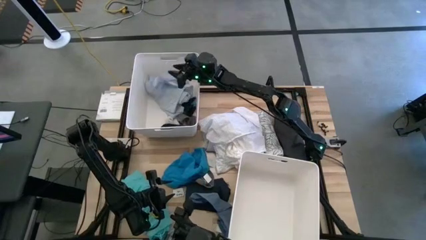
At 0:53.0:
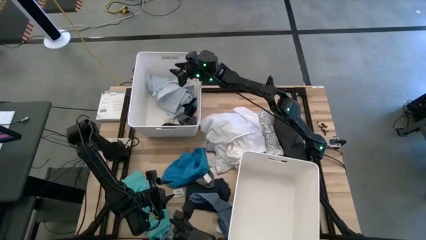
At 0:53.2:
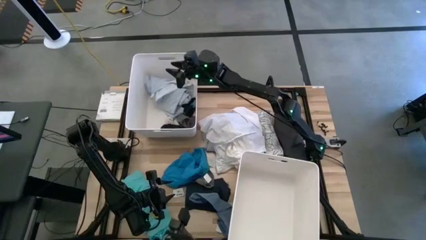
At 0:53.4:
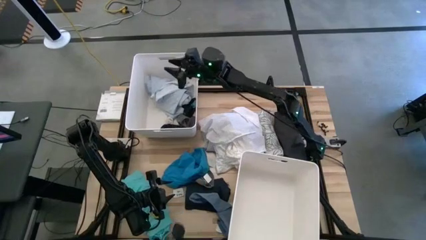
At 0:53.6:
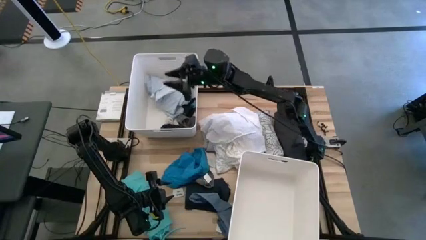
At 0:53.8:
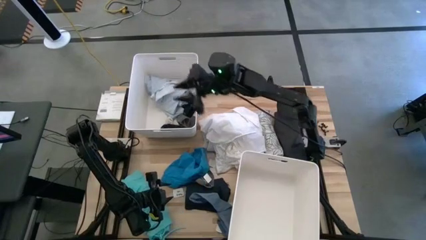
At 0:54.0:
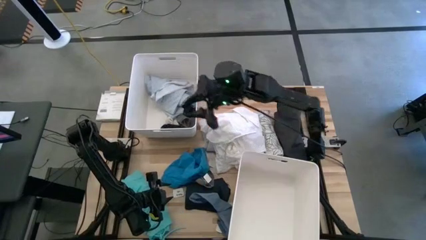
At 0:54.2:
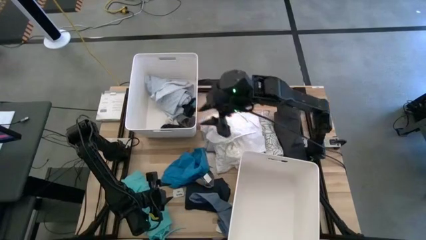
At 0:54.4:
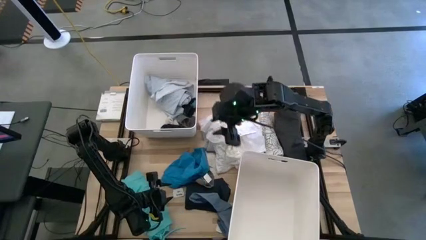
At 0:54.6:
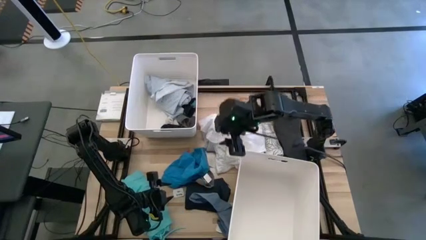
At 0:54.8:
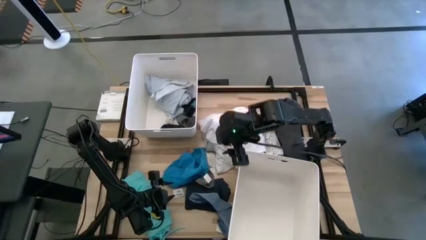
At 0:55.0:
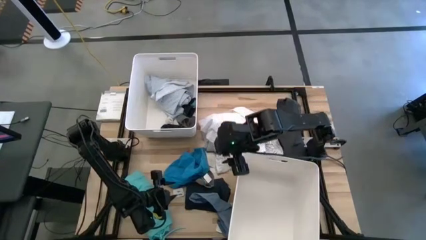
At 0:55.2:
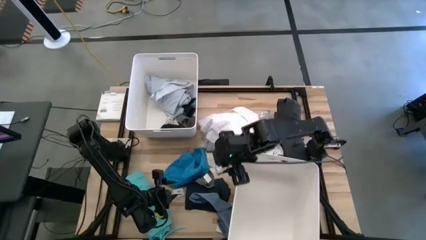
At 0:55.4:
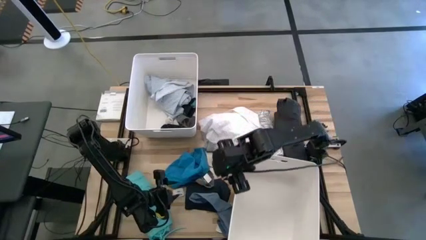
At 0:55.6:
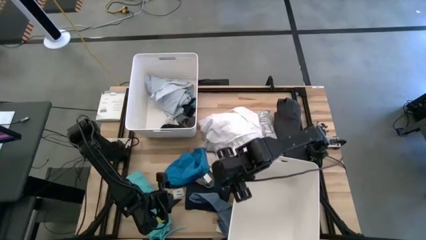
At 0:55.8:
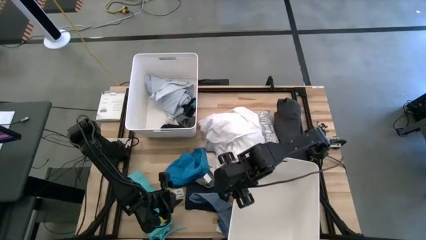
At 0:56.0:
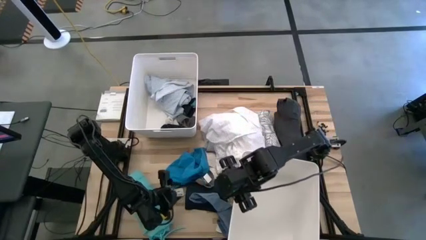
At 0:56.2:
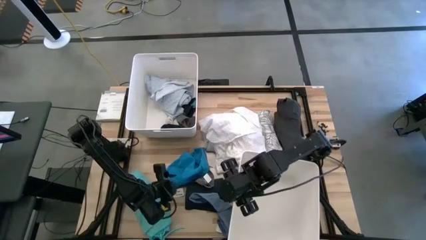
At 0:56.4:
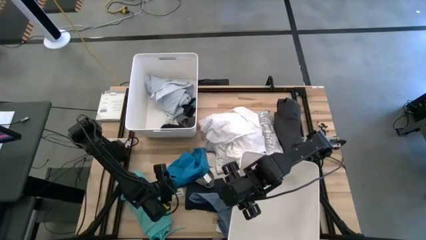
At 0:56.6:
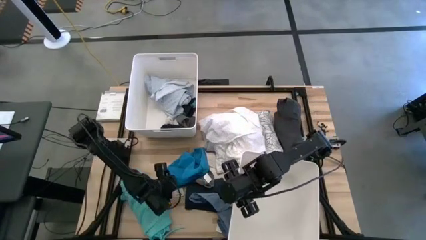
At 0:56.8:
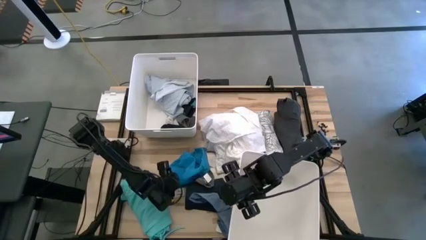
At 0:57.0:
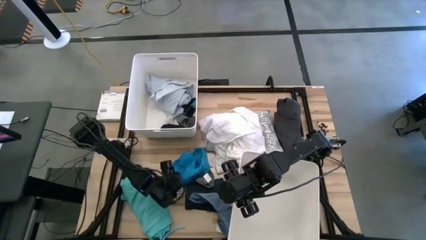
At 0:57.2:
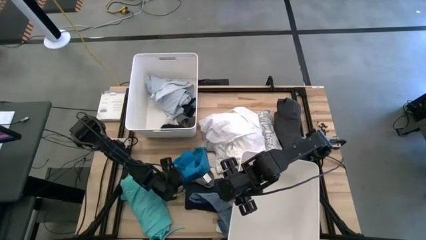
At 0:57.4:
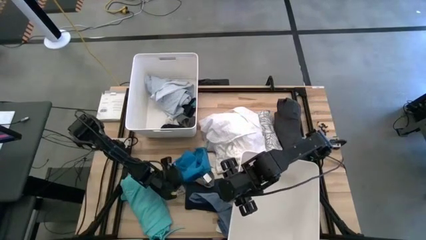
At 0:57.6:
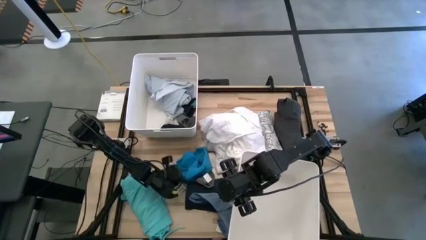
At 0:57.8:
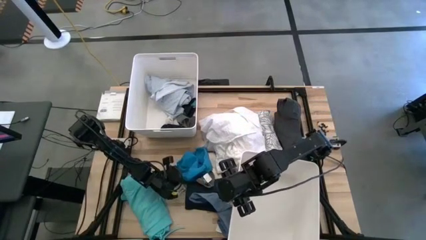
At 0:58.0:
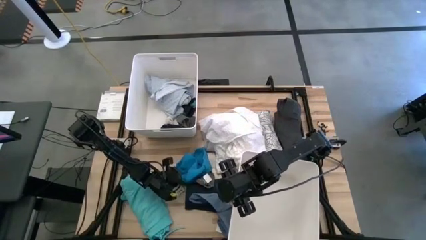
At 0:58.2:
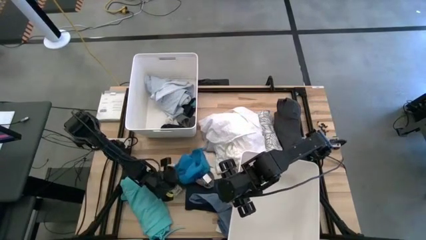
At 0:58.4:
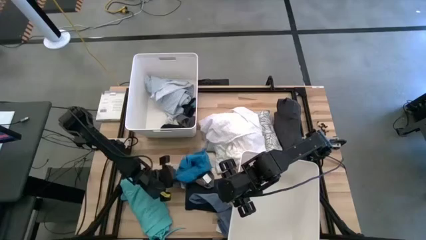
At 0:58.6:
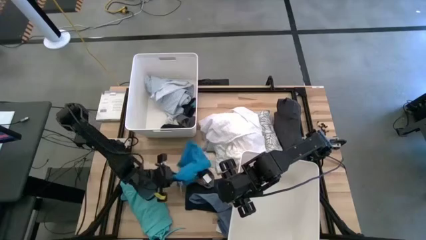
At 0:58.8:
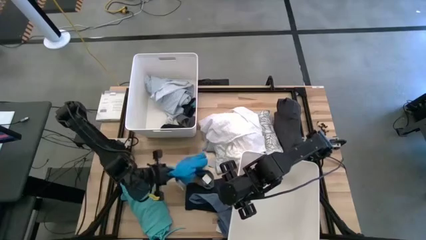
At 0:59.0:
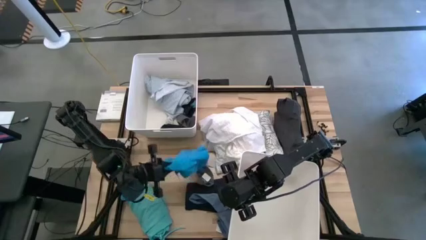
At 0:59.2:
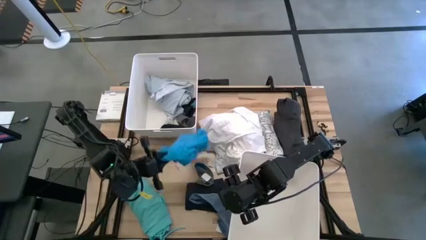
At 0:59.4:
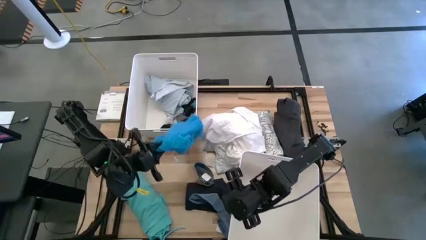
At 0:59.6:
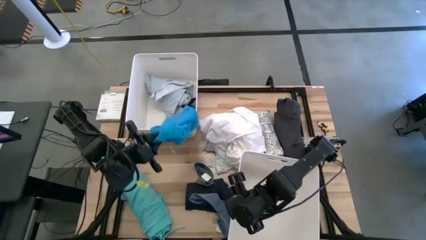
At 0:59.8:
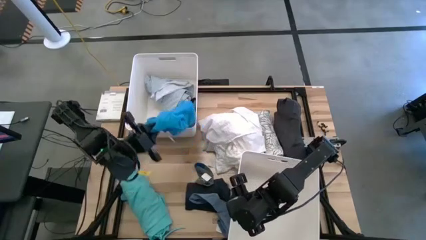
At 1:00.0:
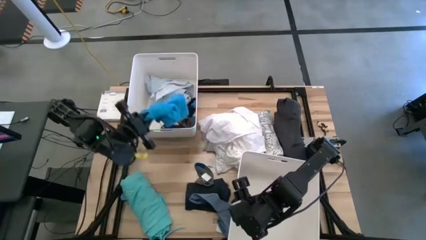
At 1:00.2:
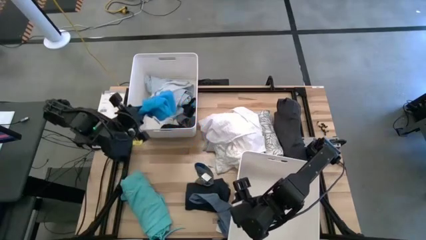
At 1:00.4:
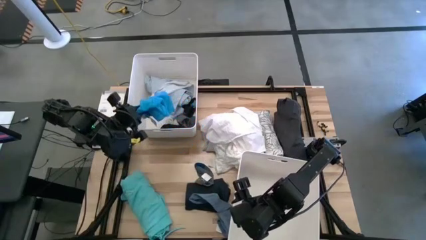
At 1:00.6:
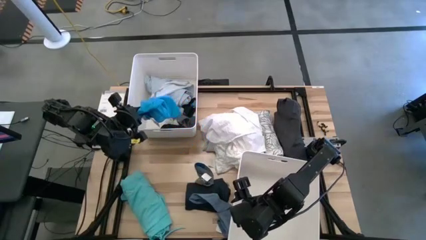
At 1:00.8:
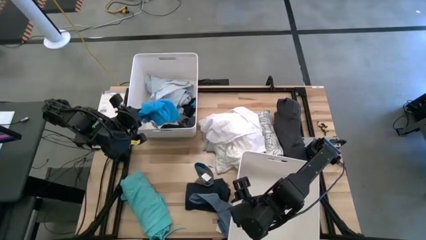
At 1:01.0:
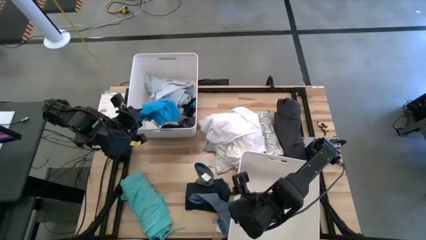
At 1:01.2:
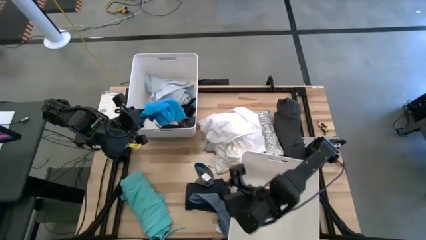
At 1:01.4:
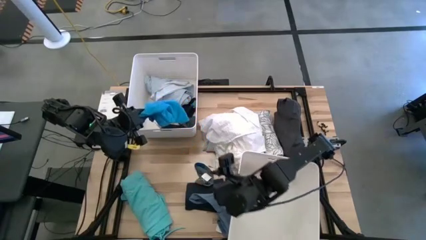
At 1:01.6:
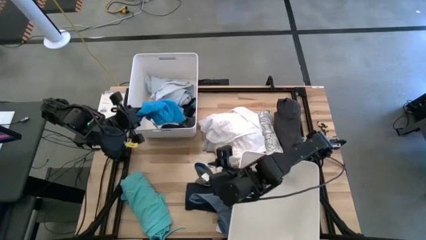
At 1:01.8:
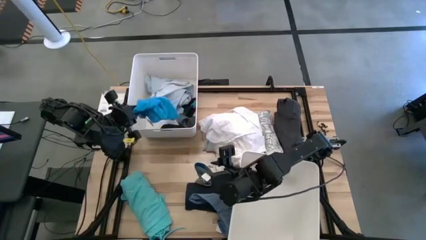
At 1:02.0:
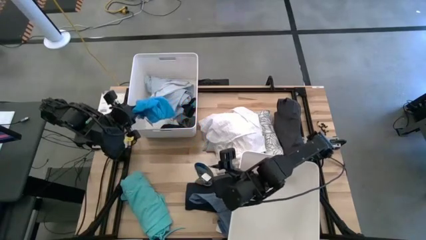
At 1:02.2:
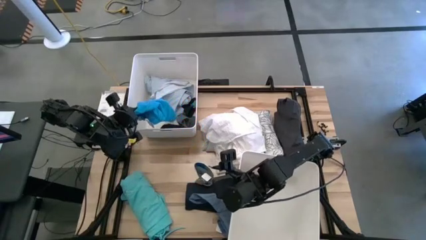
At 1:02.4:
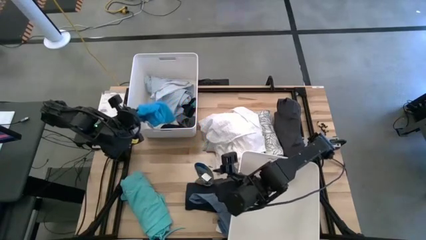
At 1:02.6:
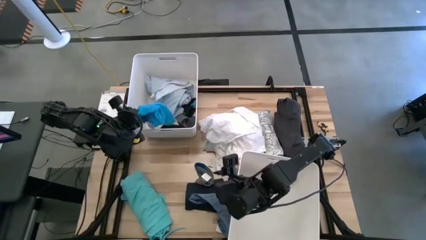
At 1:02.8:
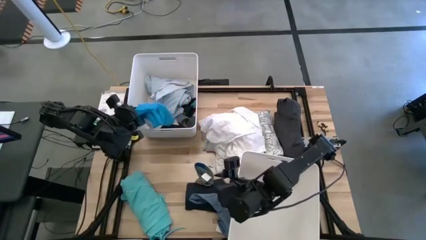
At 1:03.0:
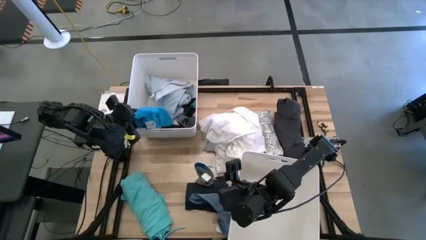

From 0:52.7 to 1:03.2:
Task: Sort clothes
Put the blue shorts into the top white laundry bin

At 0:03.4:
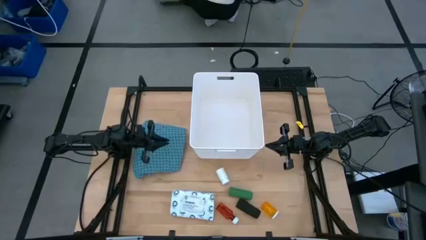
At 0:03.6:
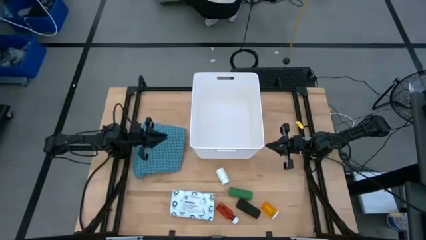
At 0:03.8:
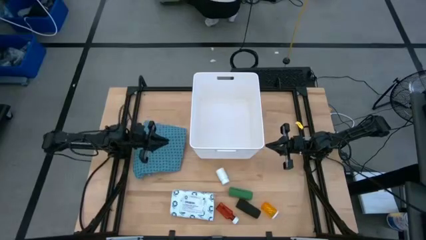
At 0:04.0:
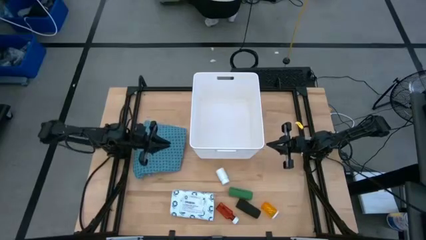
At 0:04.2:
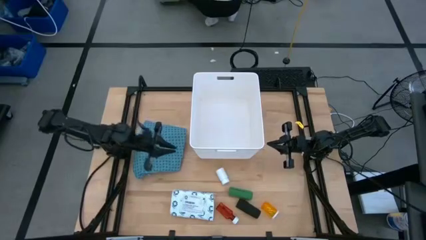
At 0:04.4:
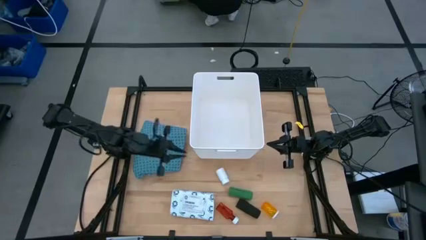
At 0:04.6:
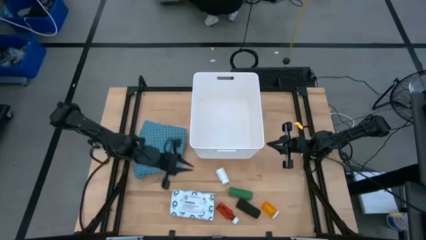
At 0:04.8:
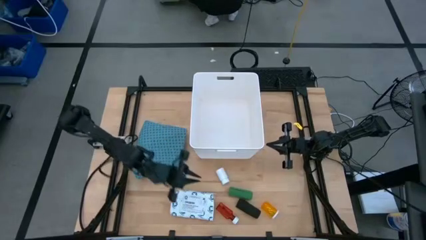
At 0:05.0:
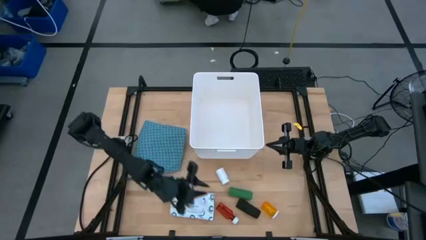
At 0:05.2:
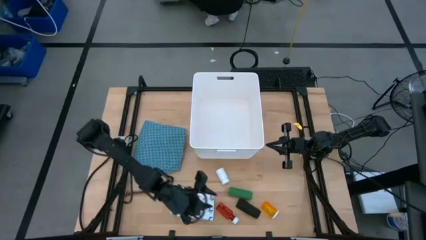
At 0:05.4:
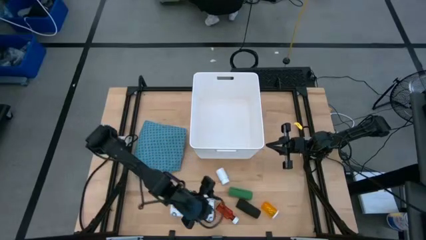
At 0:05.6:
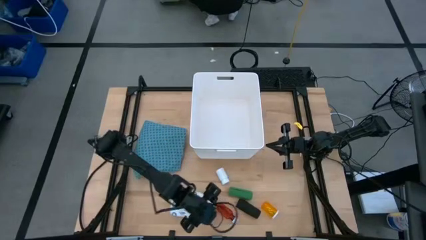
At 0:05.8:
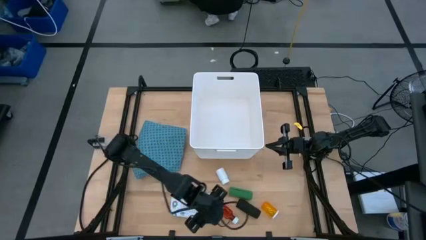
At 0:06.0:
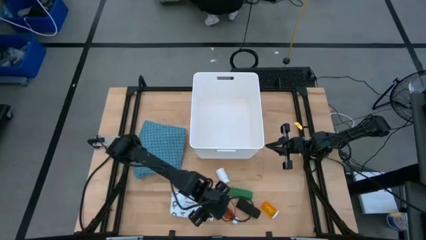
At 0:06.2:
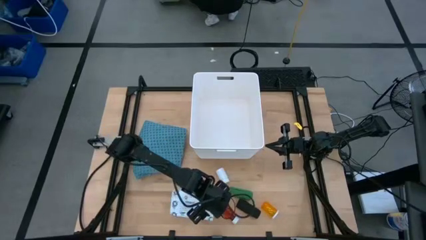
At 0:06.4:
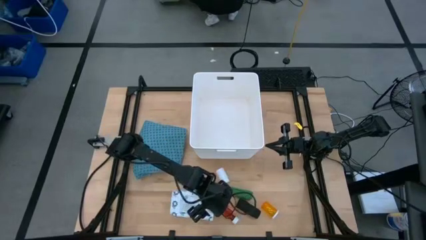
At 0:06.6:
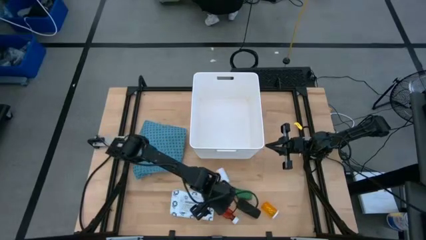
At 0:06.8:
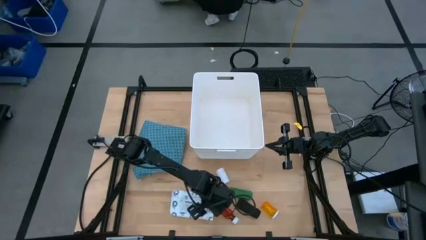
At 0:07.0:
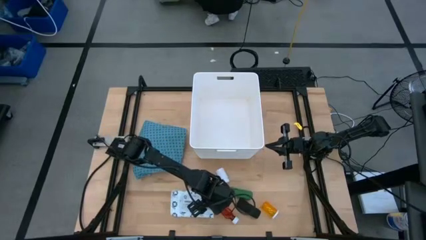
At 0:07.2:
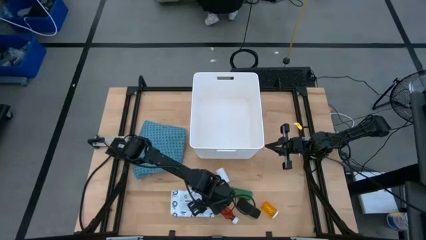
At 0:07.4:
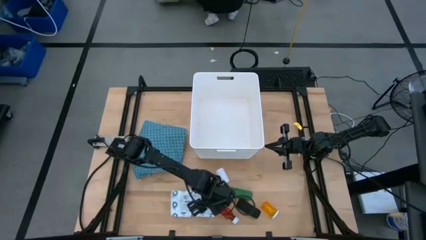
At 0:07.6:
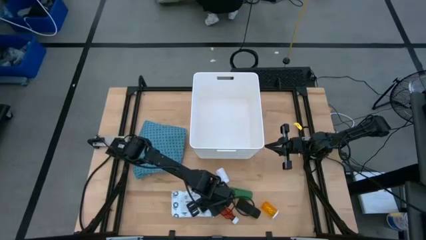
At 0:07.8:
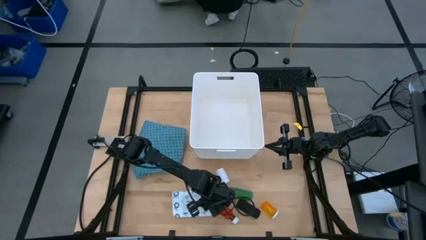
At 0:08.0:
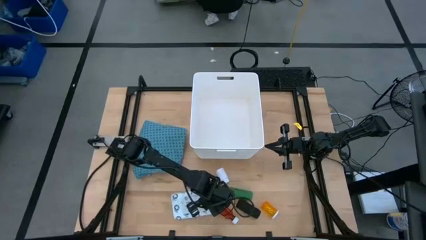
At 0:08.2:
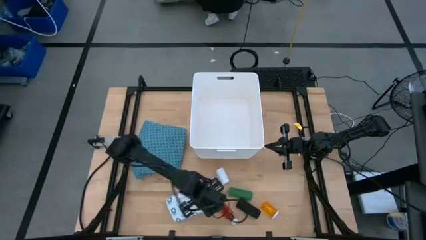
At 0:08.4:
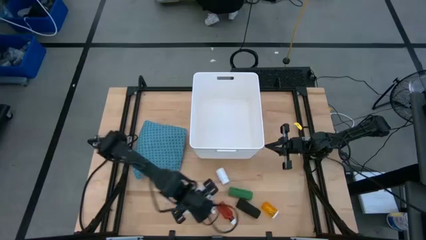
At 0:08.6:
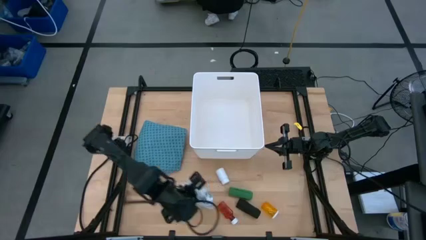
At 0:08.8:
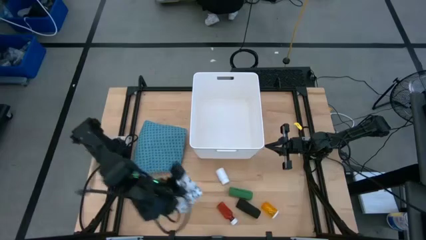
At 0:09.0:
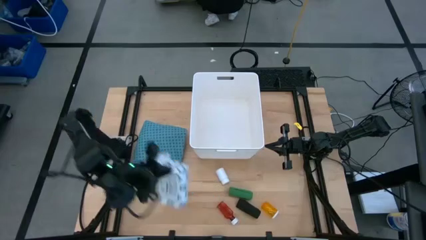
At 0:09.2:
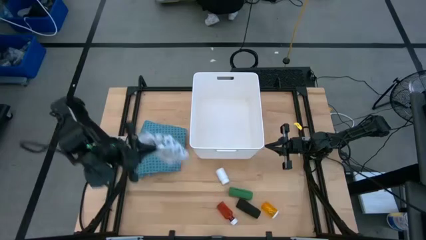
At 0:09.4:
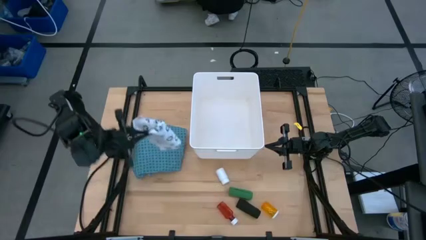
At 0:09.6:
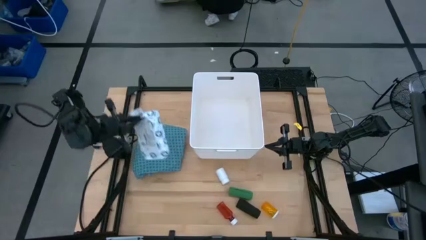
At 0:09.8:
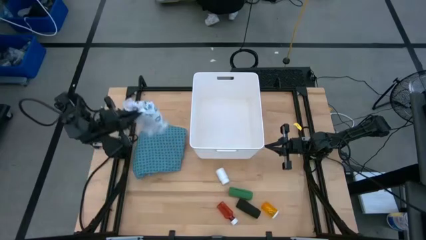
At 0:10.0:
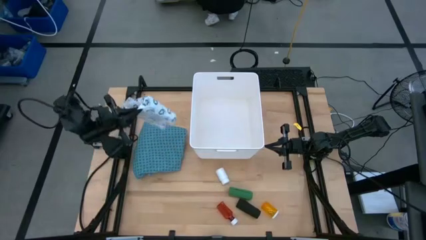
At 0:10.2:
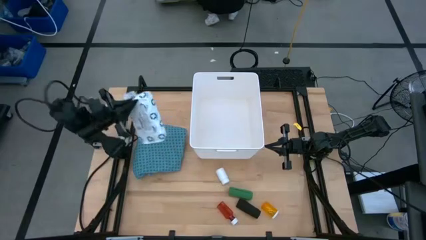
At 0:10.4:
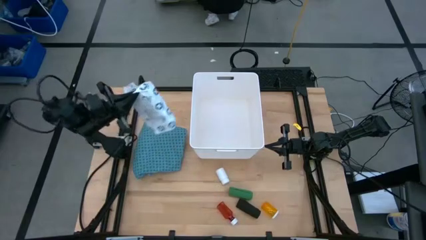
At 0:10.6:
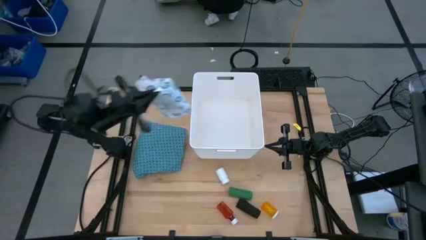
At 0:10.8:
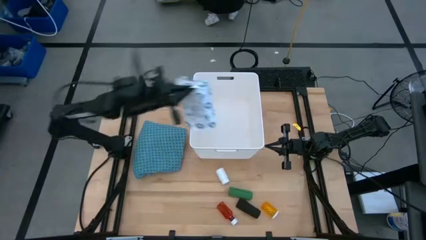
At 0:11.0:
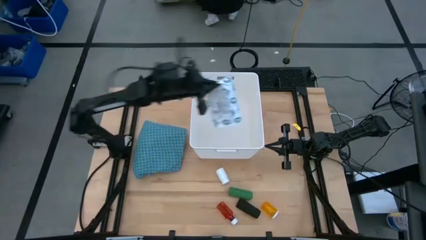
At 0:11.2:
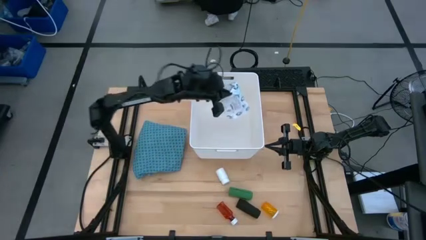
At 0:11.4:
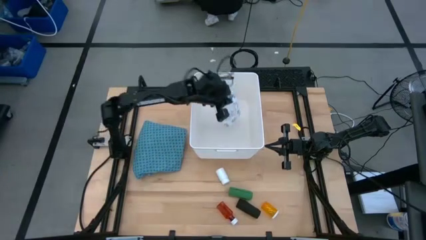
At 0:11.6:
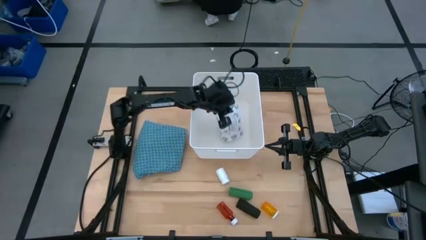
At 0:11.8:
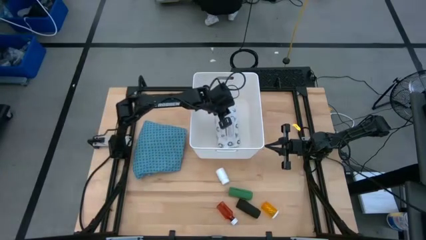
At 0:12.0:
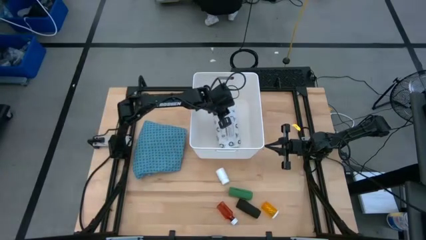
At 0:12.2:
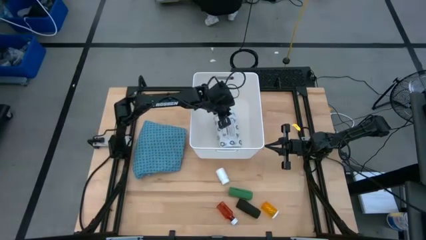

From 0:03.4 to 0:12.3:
Task: Pick & place medical supplies in basket/bin
Put the white mailer bag into the white bin
